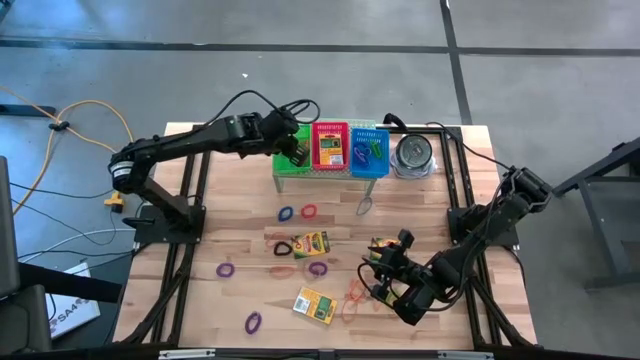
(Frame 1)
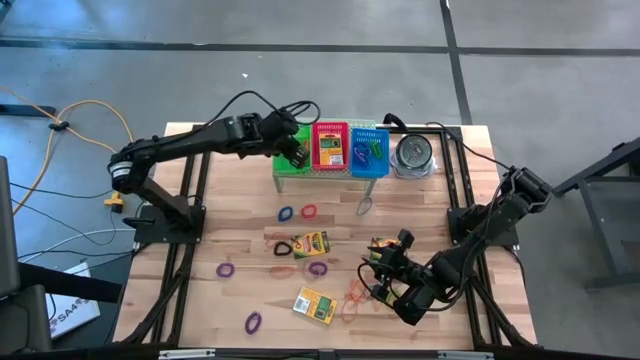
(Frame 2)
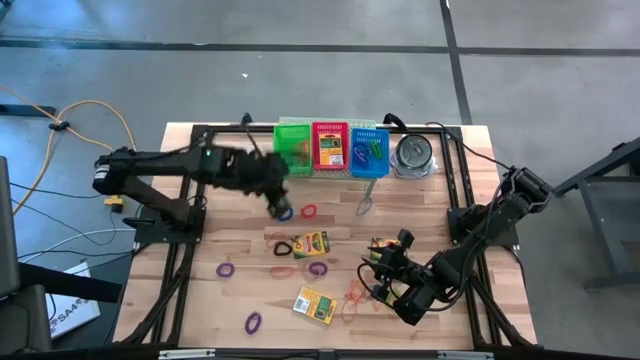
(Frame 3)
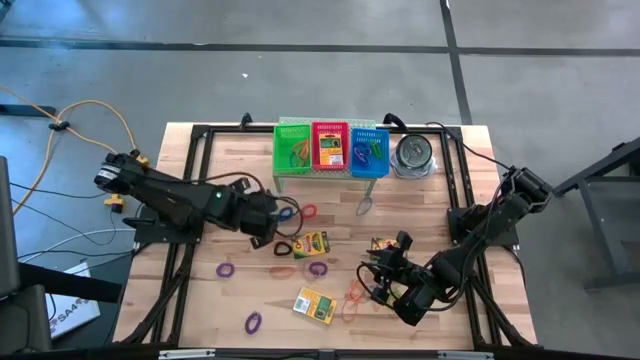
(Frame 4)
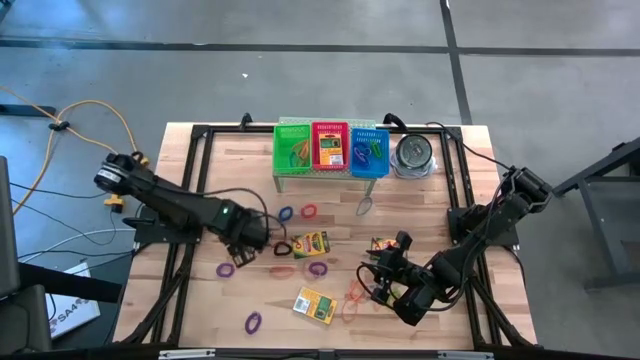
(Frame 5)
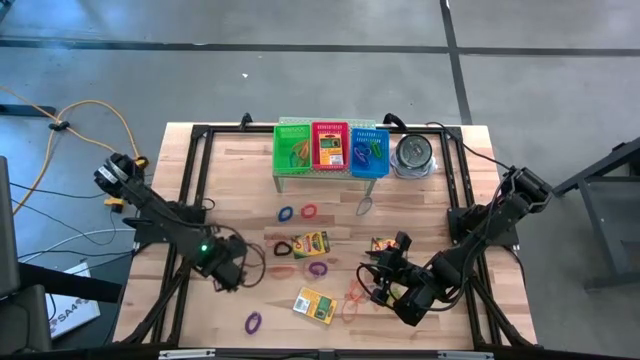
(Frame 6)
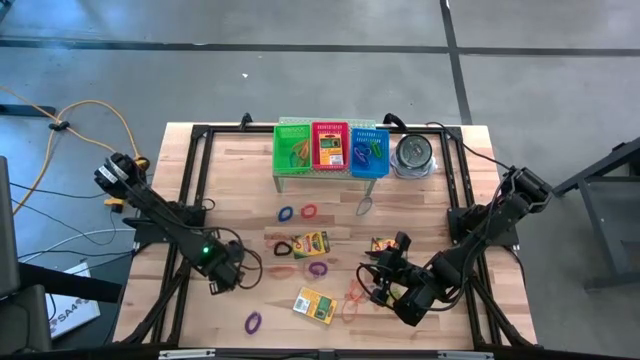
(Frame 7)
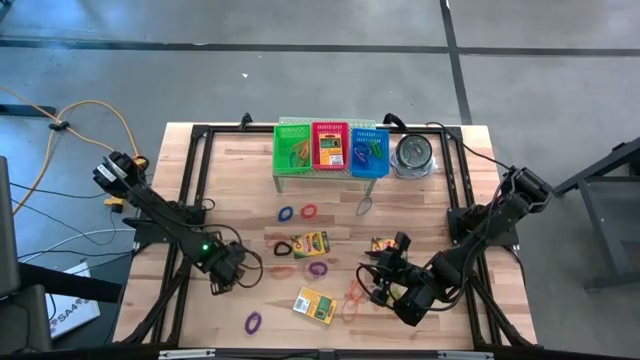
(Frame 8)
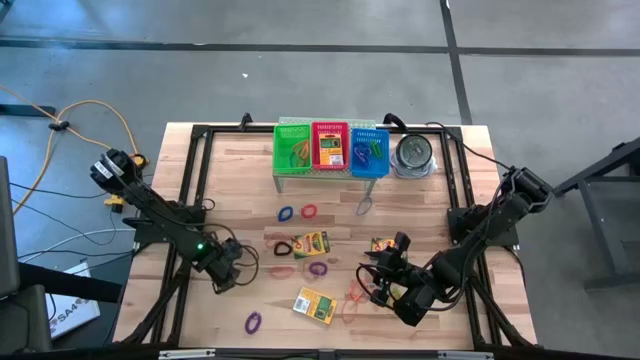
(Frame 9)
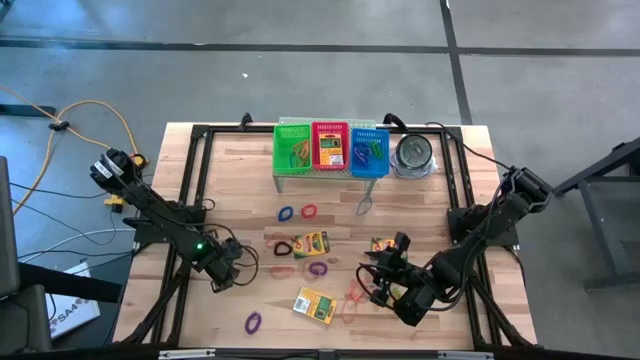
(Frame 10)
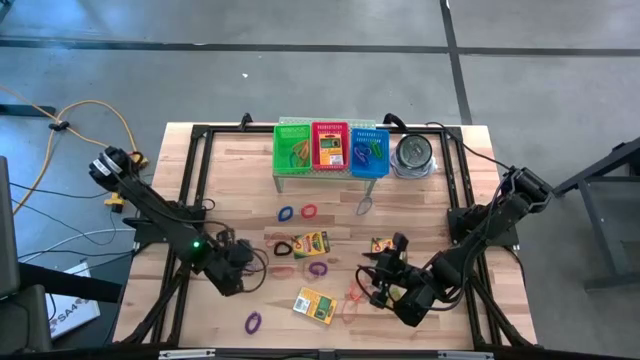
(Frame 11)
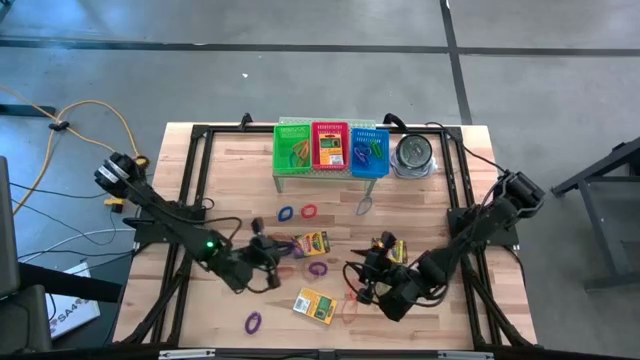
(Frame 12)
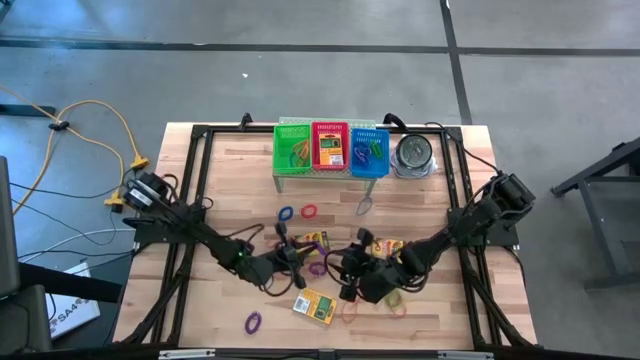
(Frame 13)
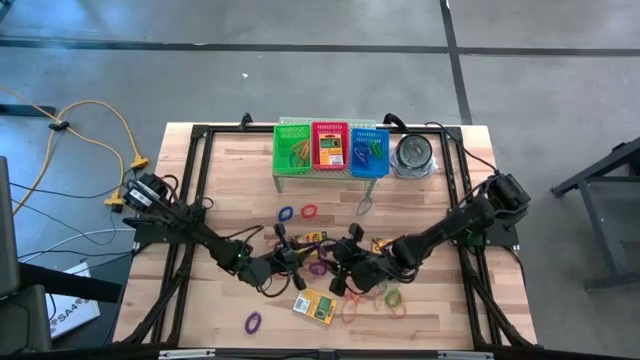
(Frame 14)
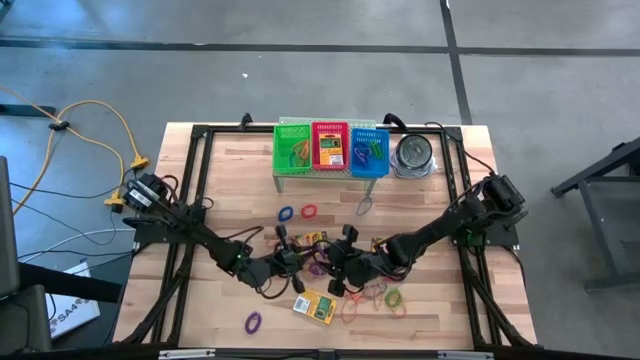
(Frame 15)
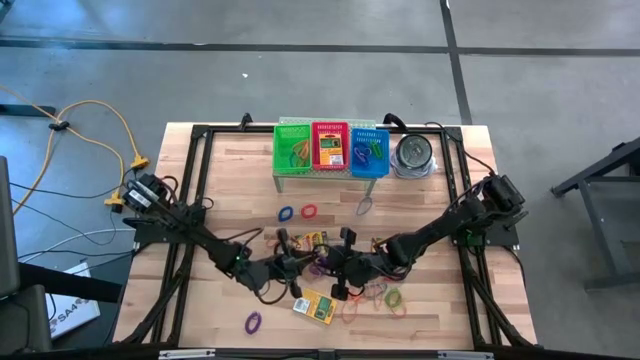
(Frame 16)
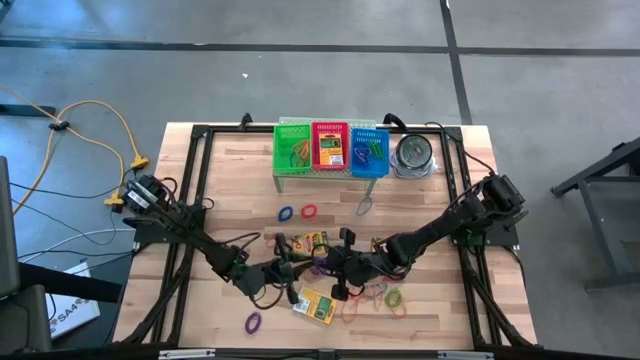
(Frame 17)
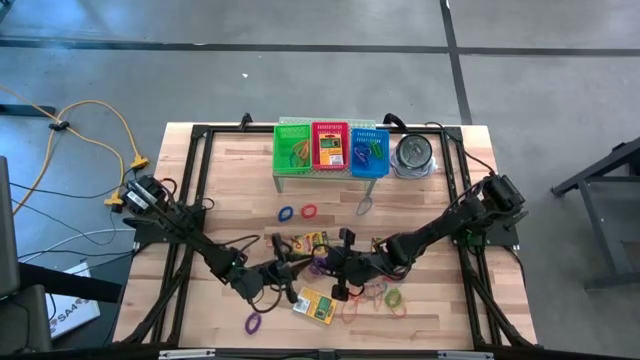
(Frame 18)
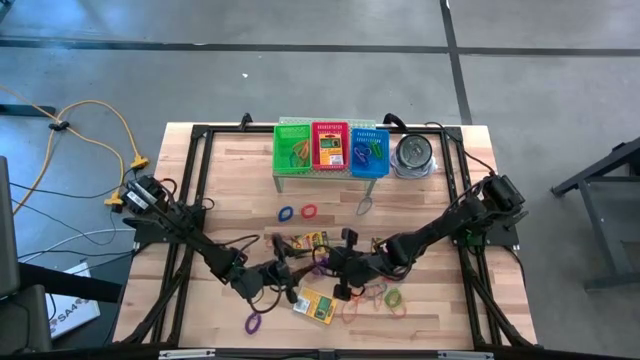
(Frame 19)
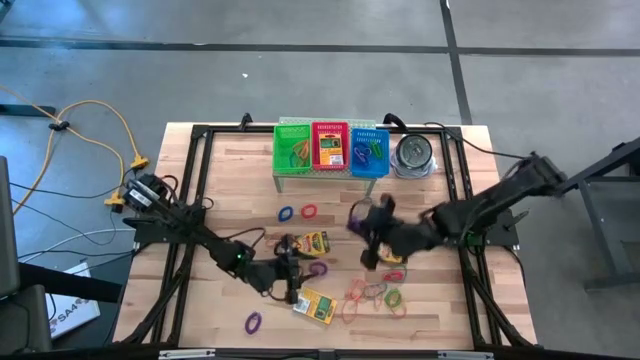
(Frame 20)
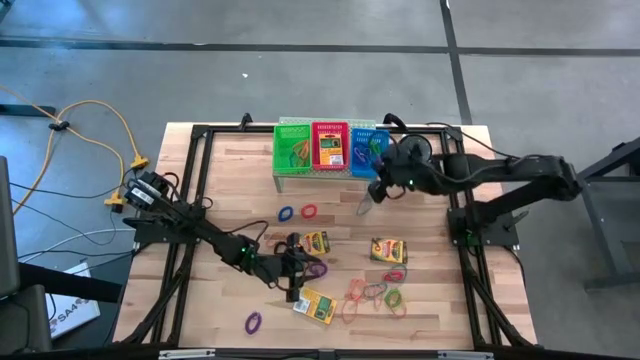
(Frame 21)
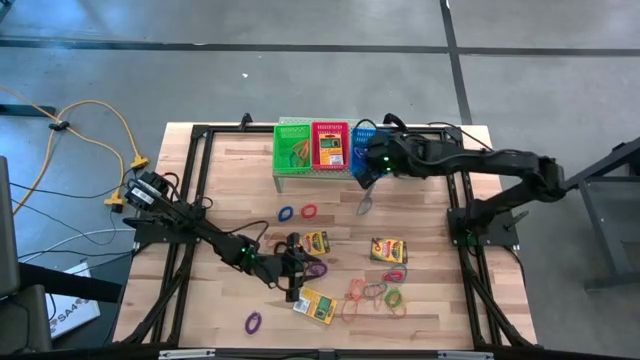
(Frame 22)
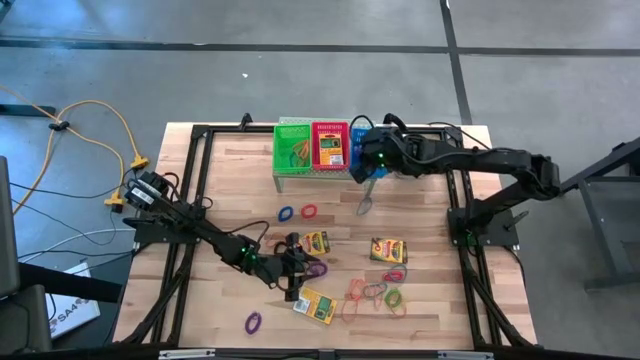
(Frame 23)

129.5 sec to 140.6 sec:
Task: Pick & Place Office Desk Supplies
Put the top left violet spring keychain into the blue bin on the shelf
